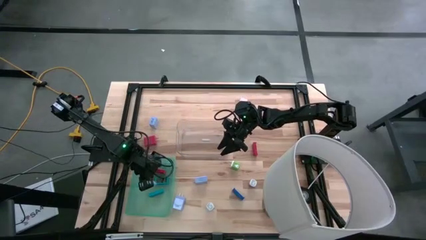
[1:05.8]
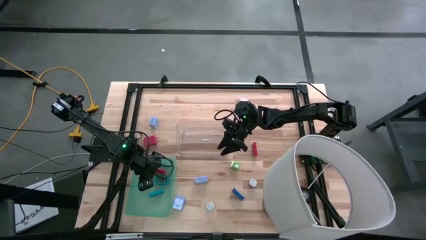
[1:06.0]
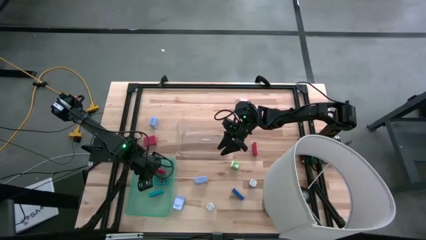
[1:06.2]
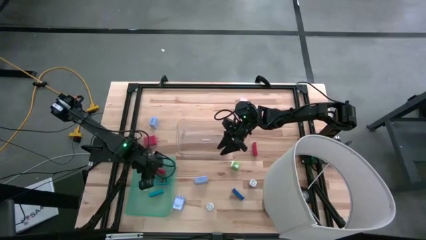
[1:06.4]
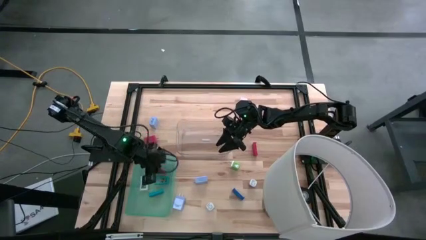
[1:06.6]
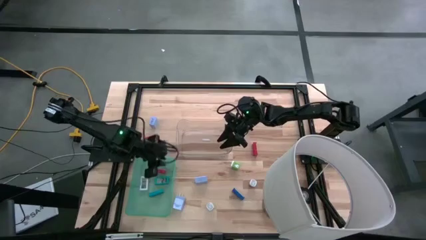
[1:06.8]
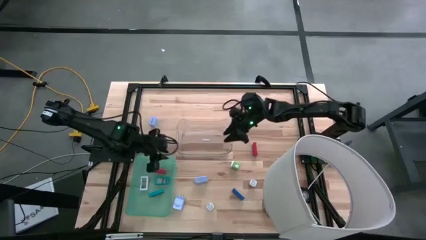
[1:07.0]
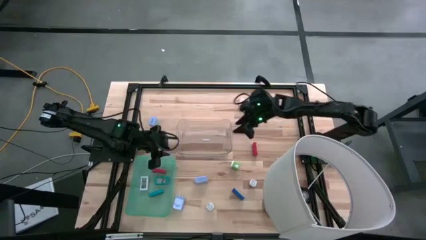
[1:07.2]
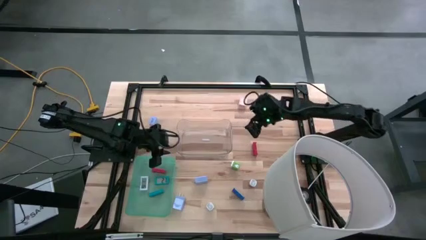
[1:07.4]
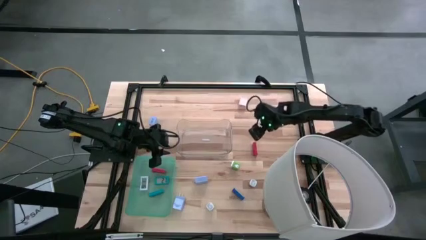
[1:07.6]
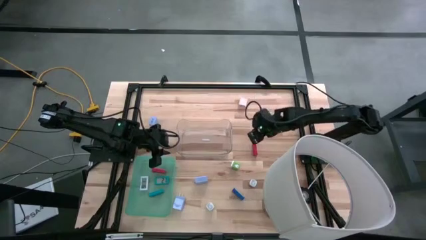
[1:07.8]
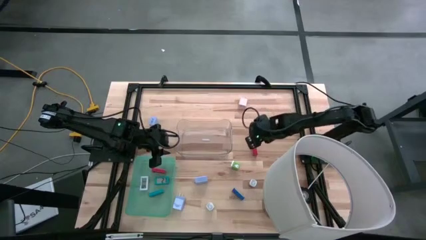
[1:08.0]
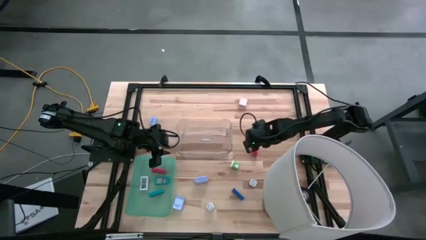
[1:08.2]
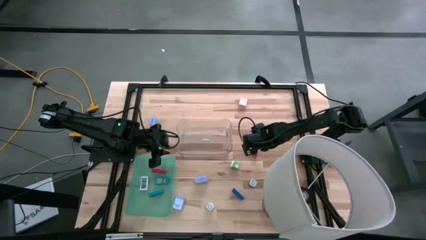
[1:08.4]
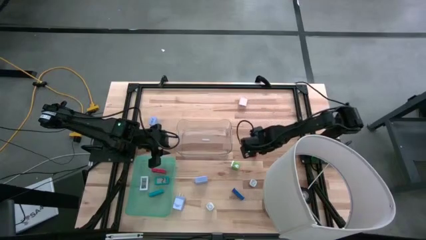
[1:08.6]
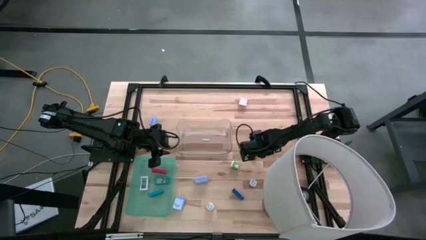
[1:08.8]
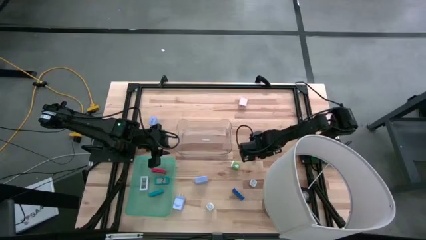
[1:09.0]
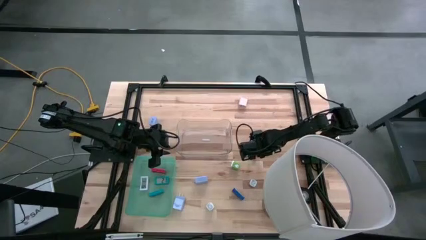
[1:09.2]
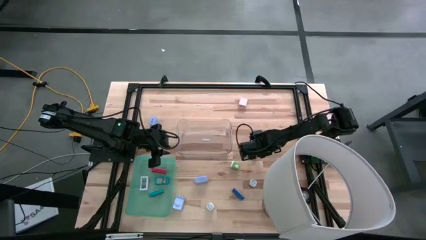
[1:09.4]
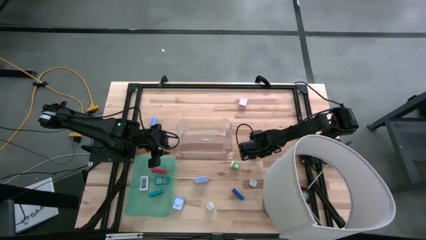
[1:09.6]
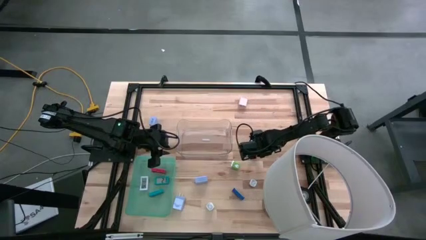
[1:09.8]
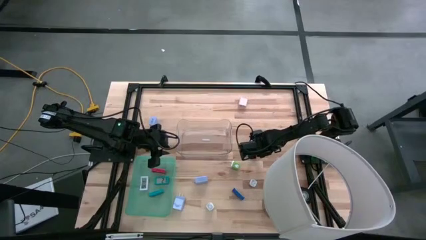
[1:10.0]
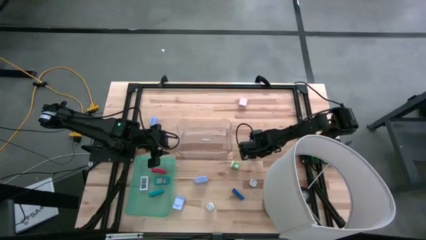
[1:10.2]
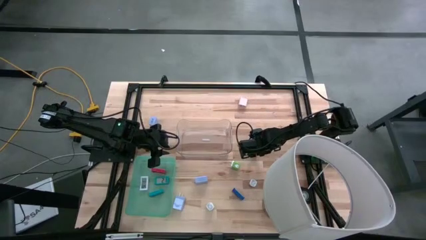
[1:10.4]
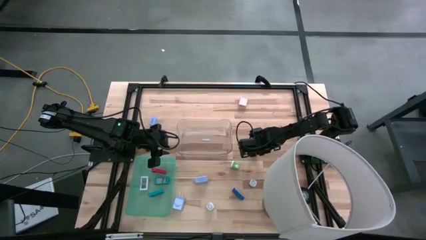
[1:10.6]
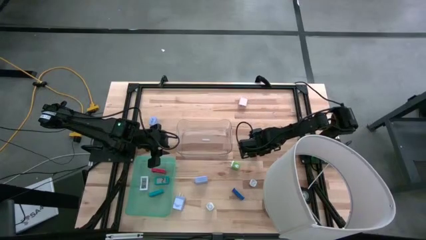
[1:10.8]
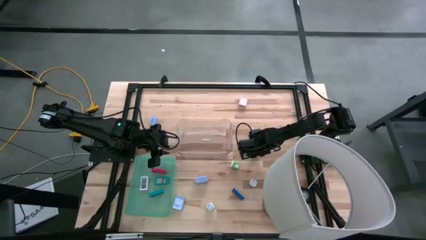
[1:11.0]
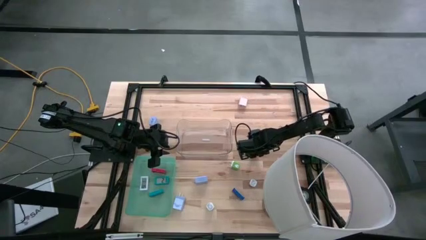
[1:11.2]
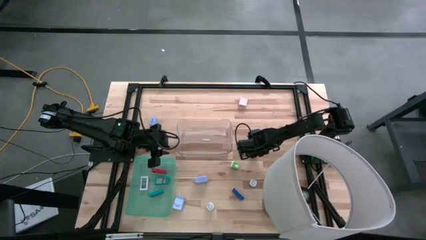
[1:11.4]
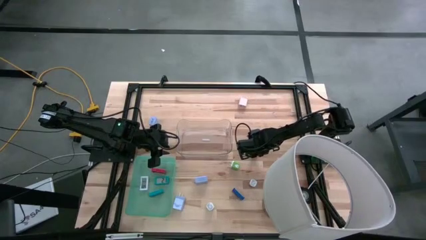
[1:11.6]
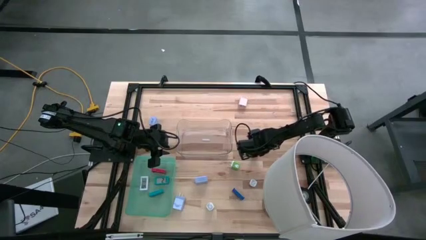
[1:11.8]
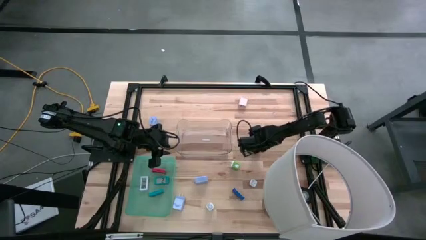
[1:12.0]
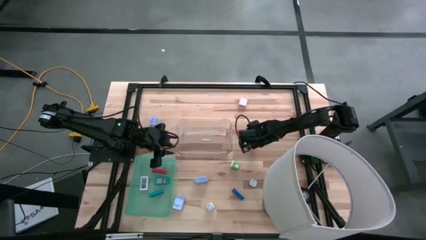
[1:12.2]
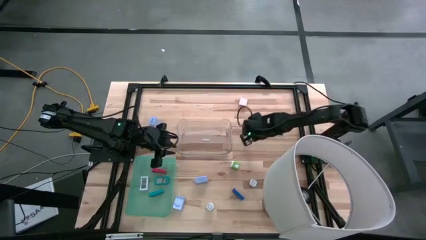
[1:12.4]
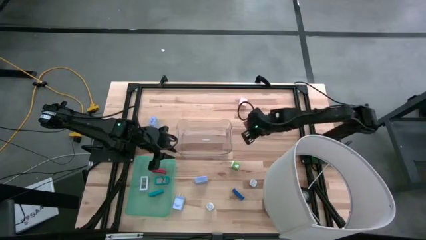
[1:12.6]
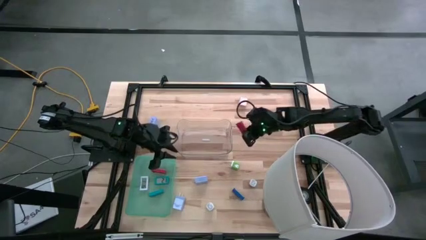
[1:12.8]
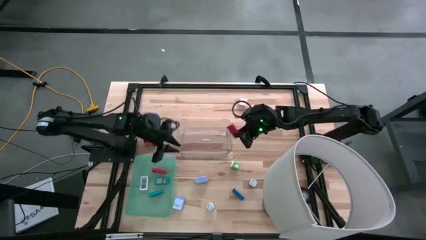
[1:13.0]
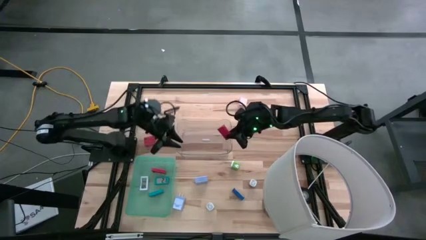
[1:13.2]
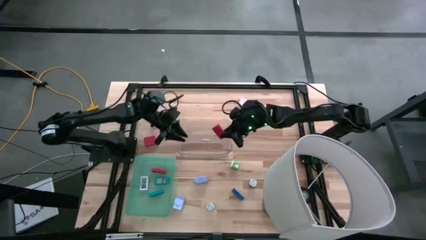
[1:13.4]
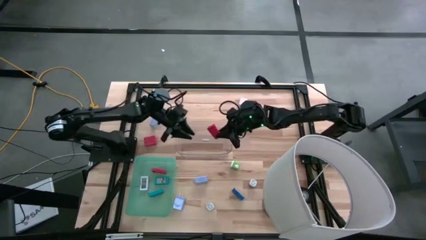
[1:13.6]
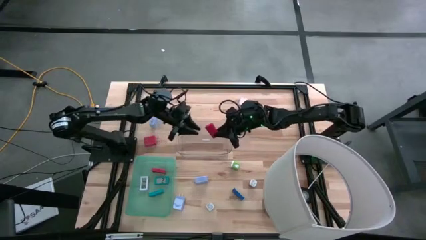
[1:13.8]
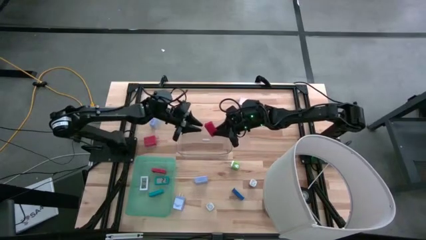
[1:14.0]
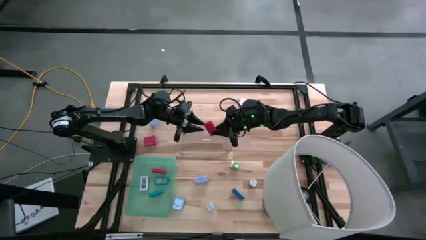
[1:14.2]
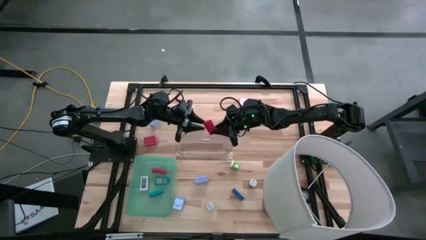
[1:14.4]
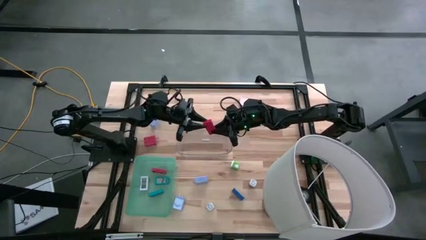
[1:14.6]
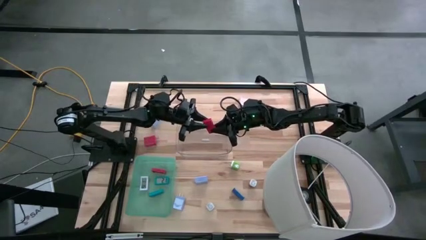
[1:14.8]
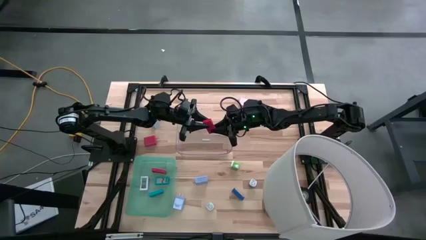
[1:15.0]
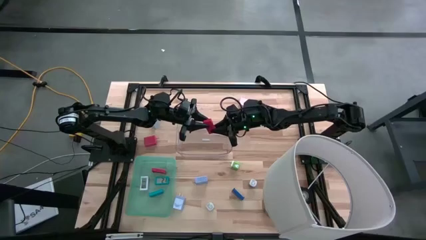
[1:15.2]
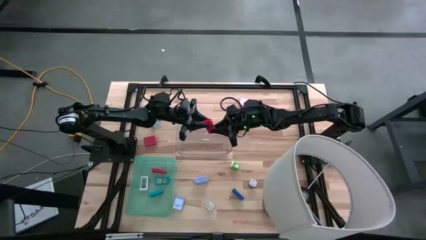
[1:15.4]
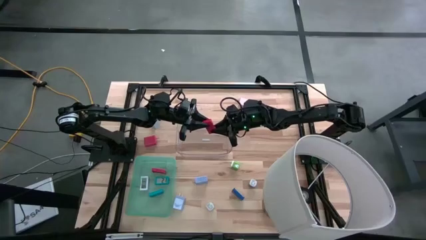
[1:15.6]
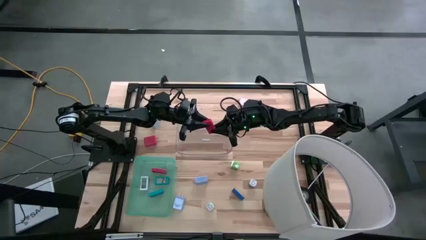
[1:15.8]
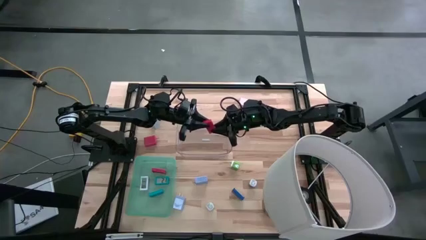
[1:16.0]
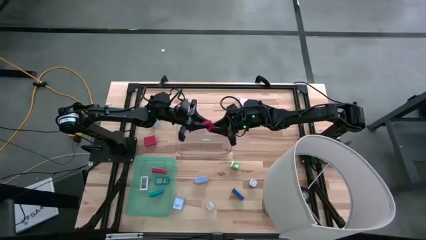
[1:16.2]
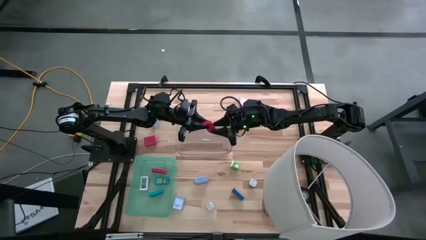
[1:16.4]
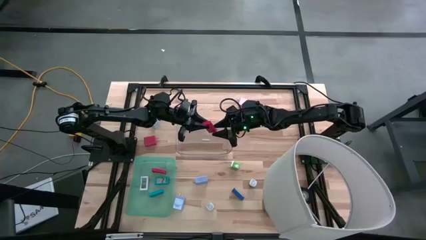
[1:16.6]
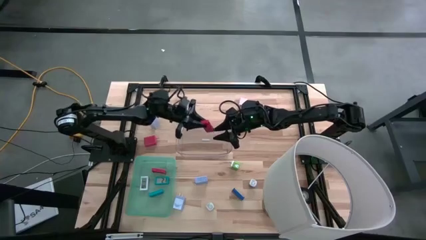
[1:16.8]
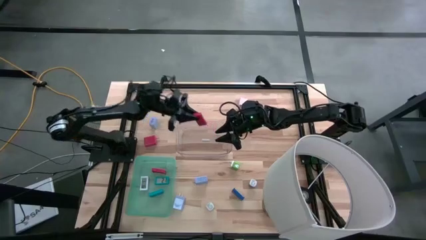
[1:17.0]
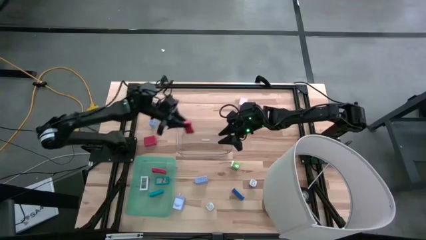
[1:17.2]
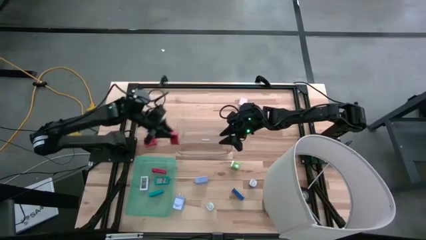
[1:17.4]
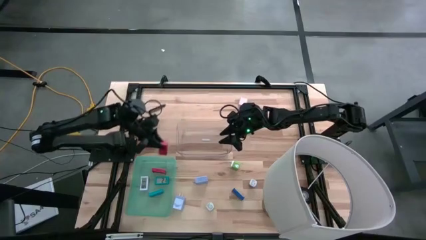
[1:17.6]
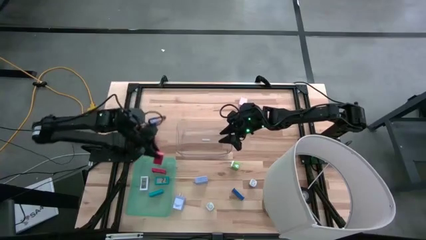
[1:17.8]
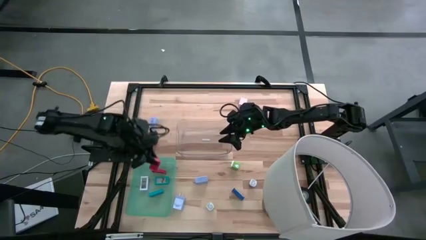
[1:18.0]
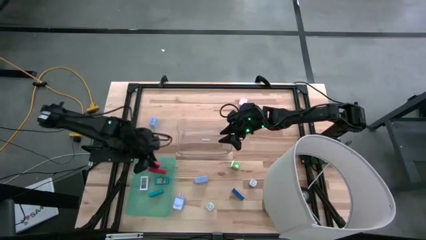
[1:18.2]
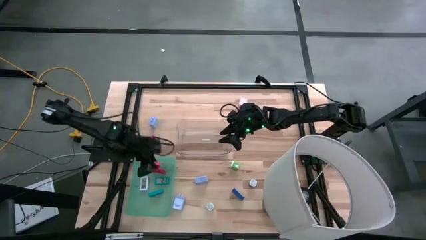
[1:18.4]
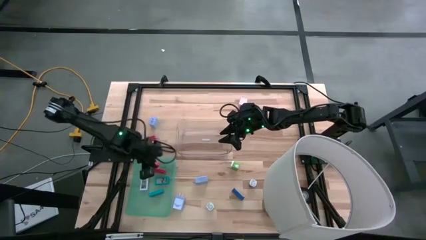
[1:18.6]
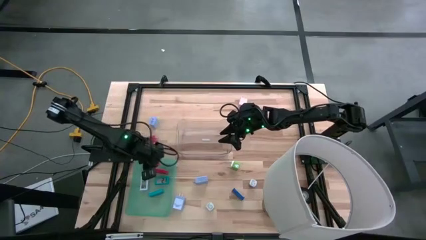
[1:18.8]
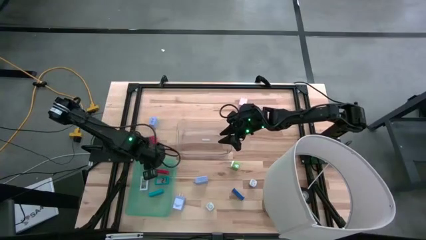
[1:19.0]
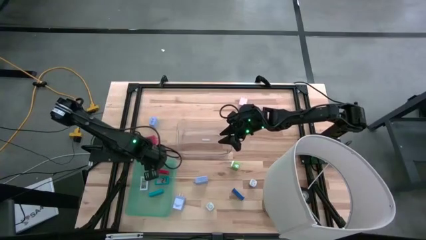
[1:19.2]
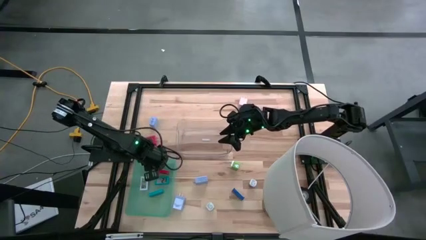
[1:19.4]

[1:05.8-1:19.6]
Task: Pick & Place Office items
Put the red digital clock into the green bin

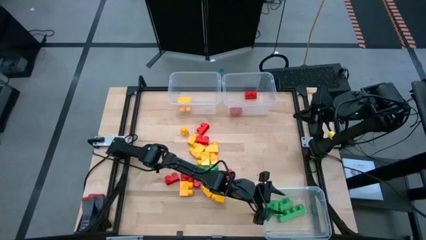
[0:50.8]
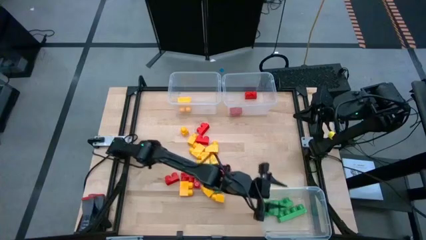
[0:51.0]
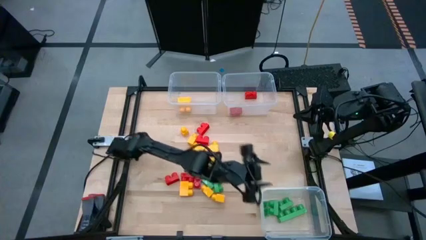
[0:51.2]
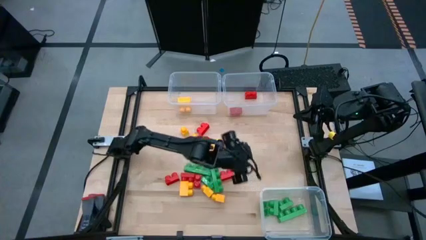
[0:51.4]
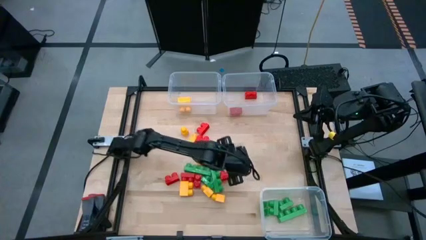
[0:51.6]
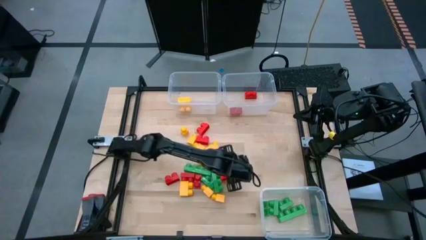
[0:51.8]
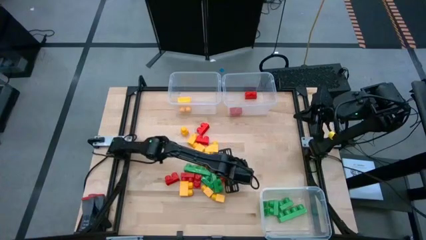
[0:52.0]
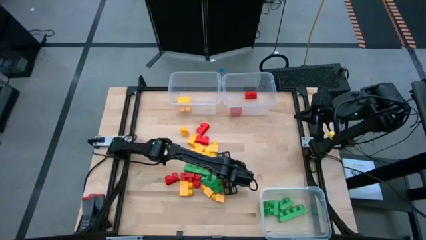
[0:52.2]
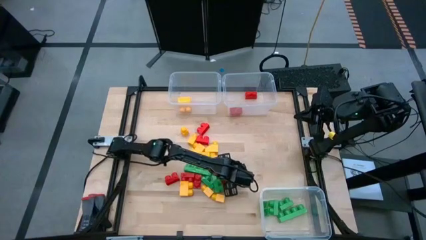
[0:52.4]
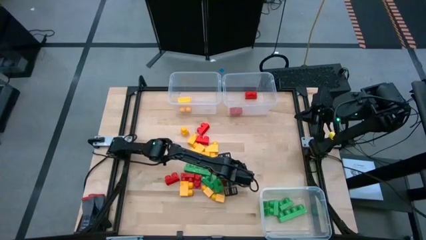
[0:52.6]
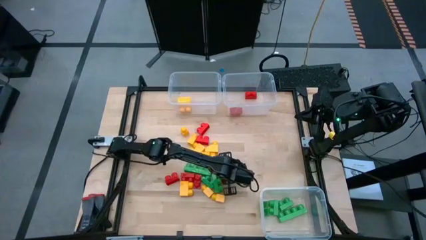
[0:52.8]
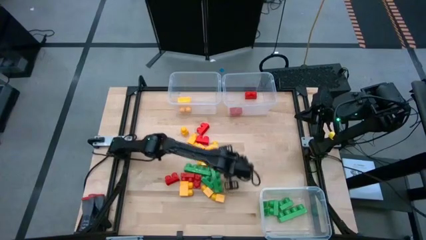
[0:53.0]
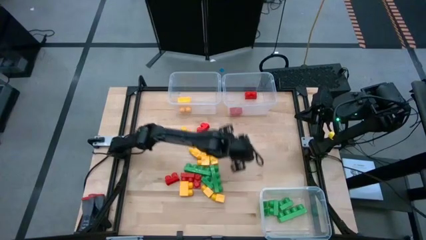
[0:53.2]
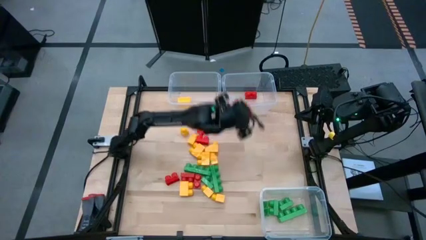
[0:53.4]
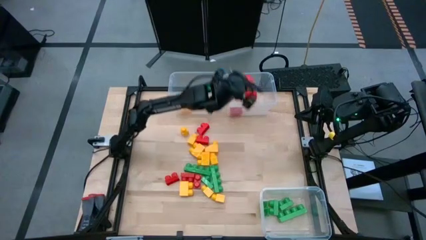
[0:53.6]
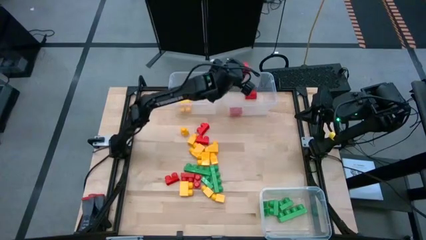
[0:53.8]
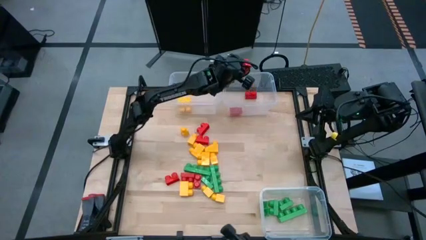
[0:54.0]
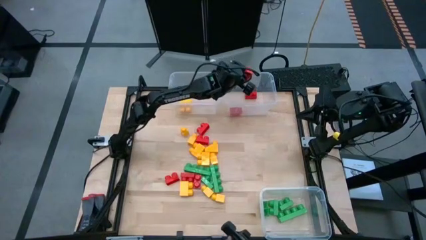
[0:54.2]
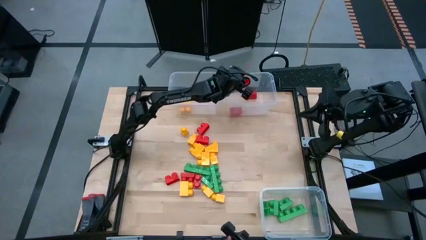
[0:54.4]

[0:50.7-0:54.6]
Task: Sort blocks
Put the red game piece into the top right transparent bin
